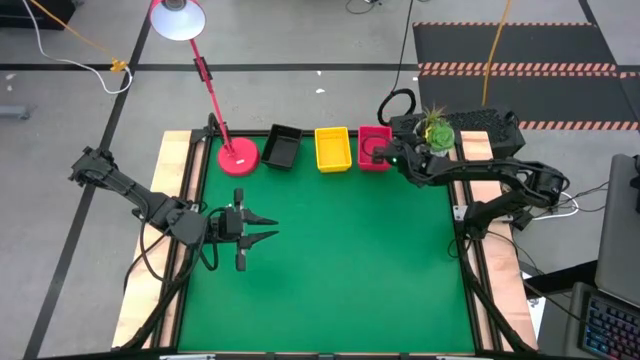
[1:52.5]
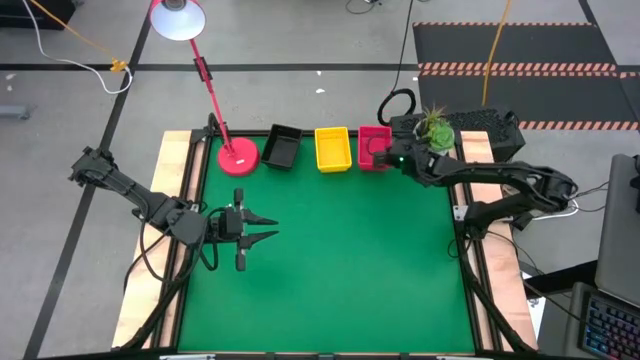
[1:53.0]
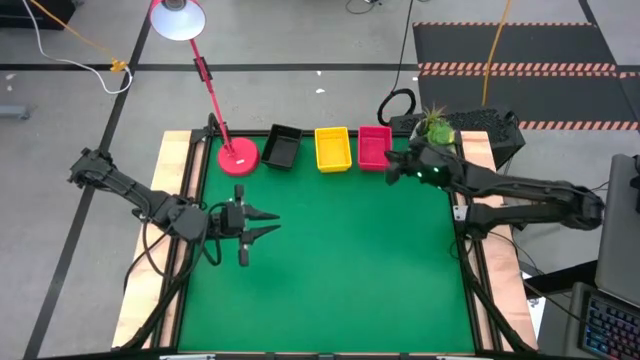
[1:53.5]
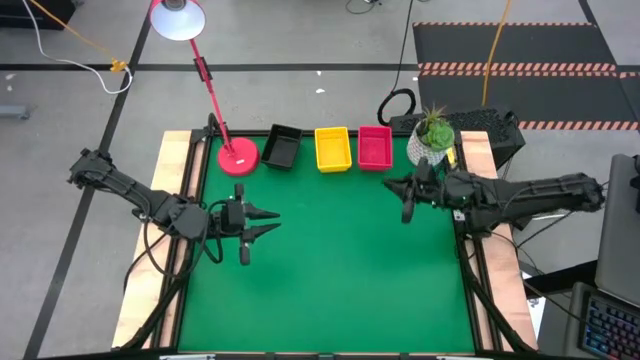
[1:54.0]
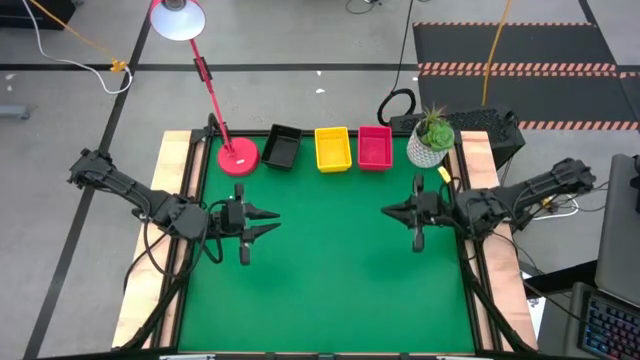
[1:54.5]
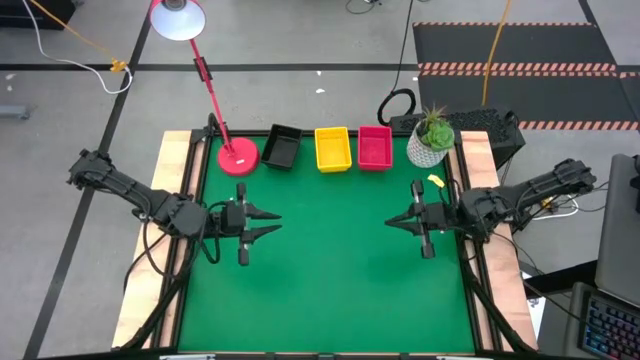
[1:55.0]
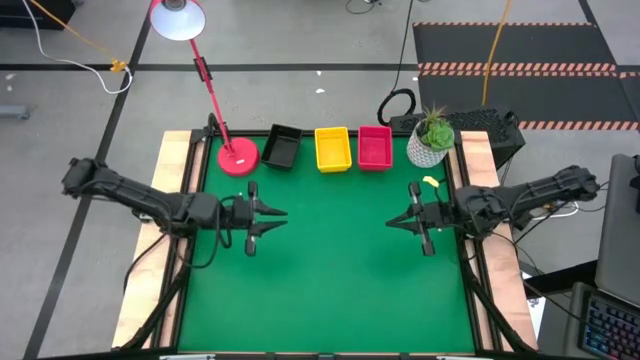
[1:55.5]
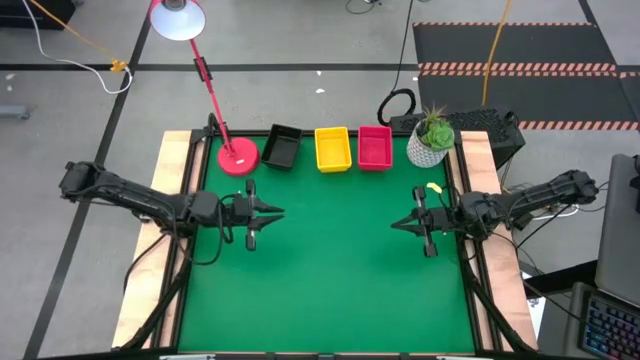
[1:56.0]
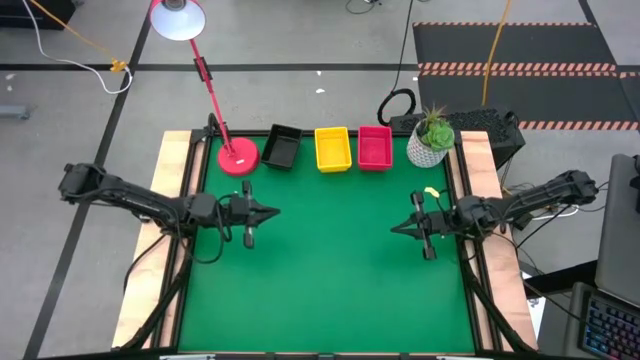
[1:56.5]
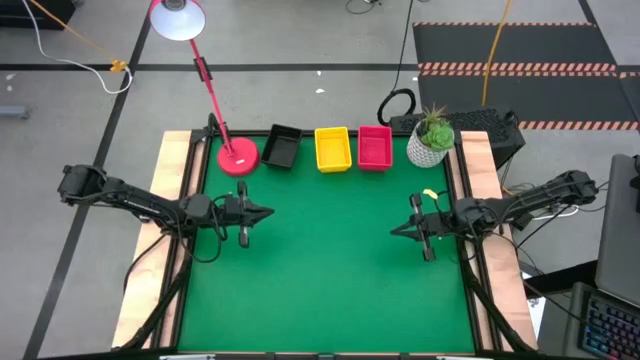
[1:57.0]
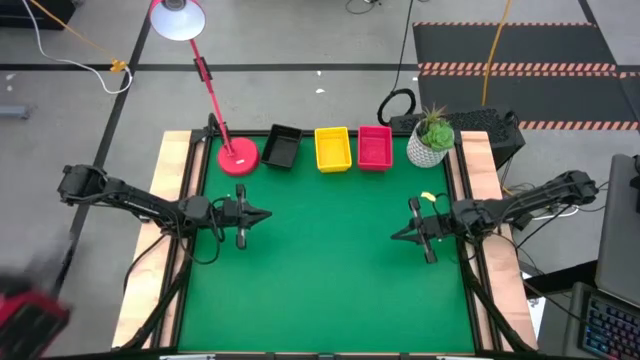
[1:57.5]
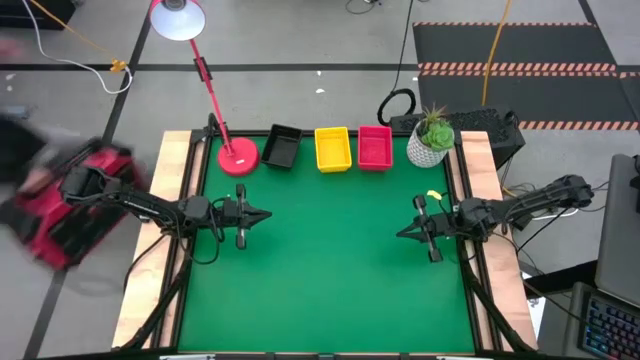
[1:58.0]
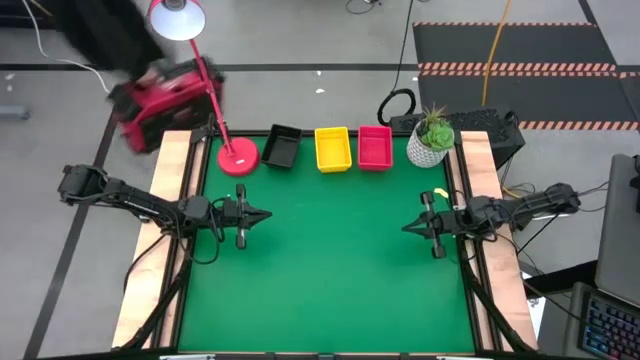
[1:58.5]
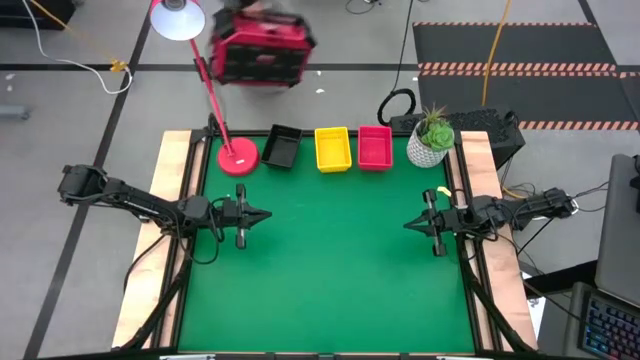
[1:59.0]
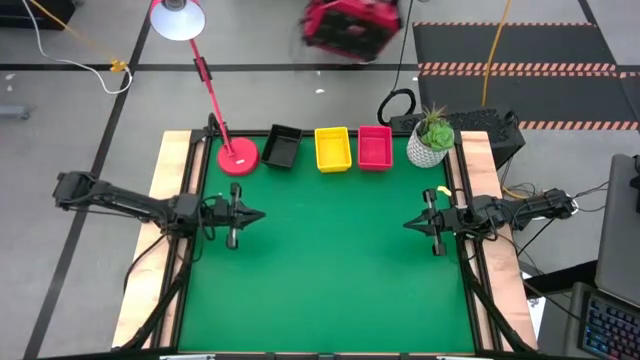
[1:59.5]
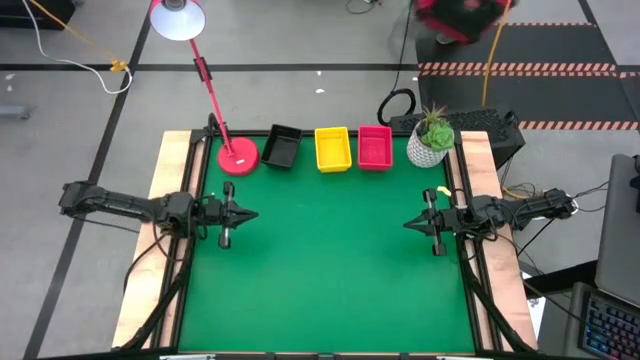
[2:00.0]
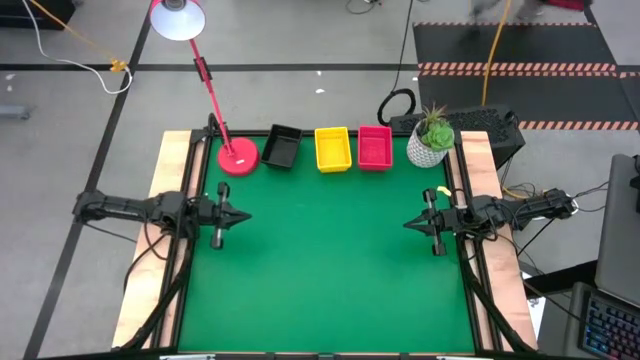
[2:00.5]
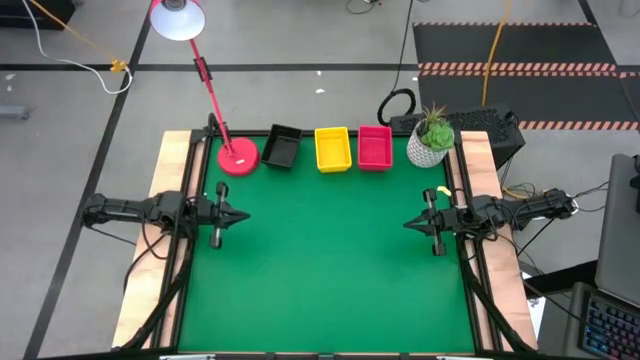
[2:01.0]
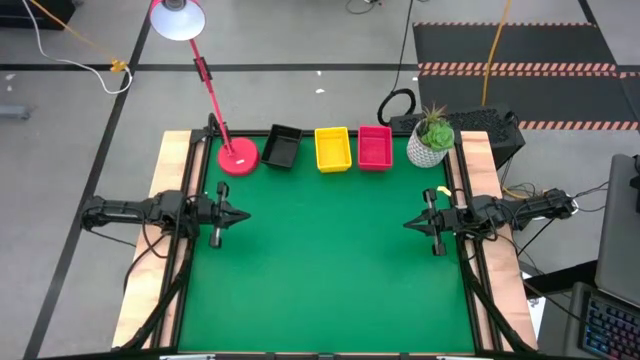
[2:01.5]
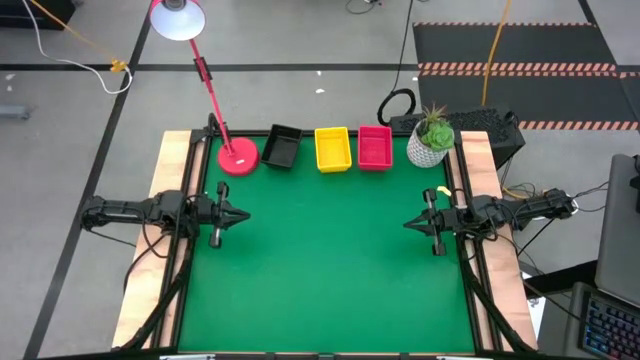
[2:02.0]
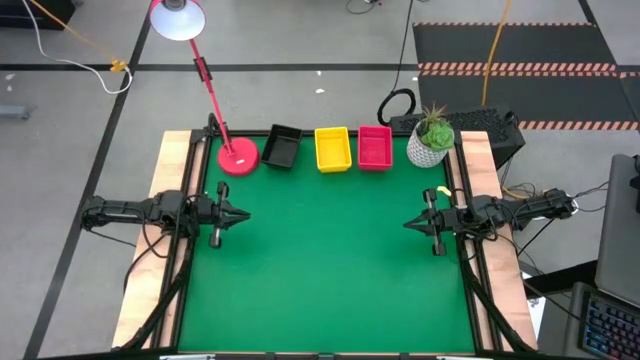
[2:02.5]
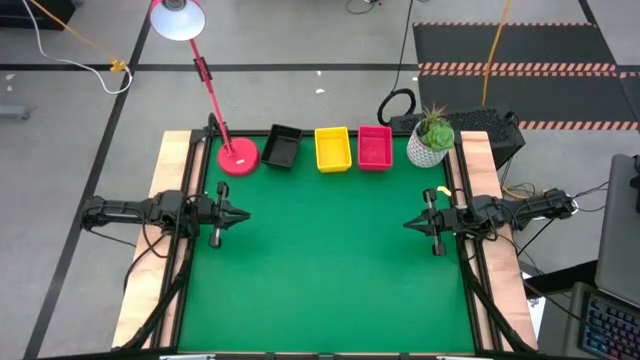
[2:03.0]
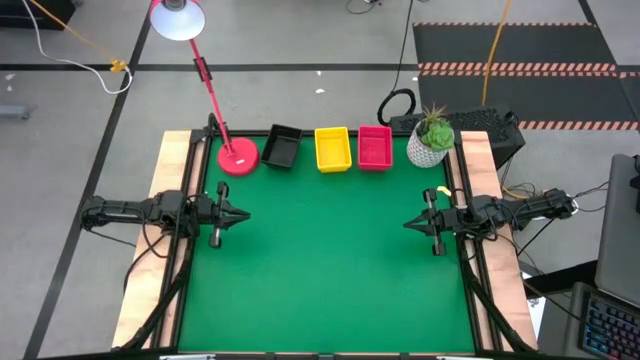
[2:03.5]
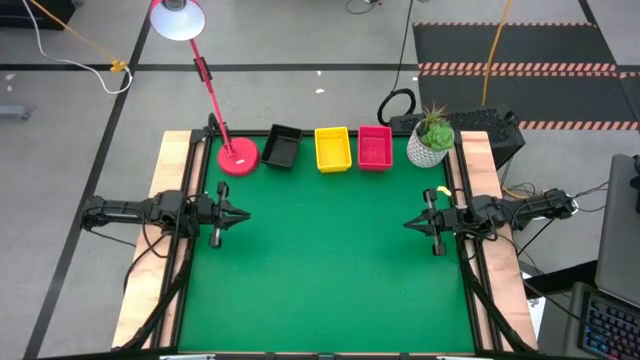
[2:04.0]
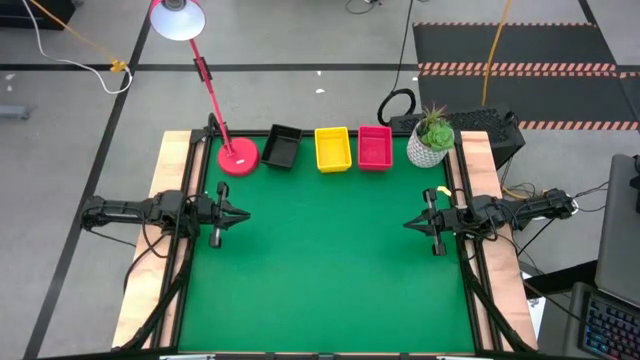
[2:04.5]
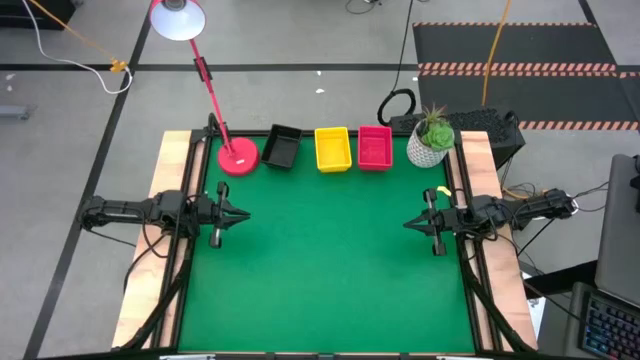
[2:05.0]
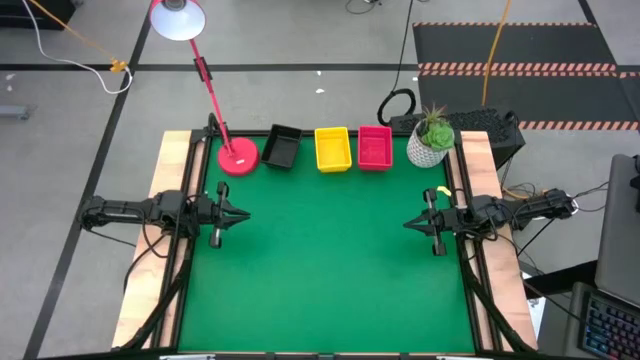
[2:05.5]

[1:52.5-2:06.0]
Return to Home Position

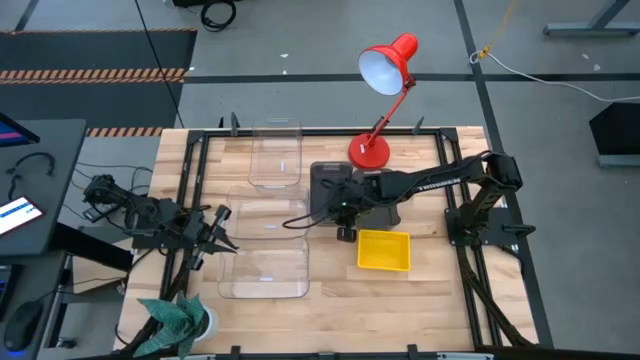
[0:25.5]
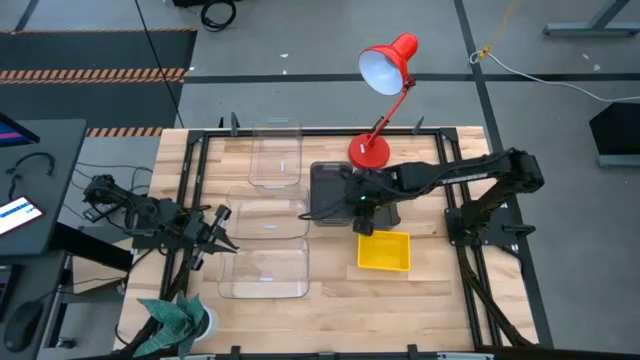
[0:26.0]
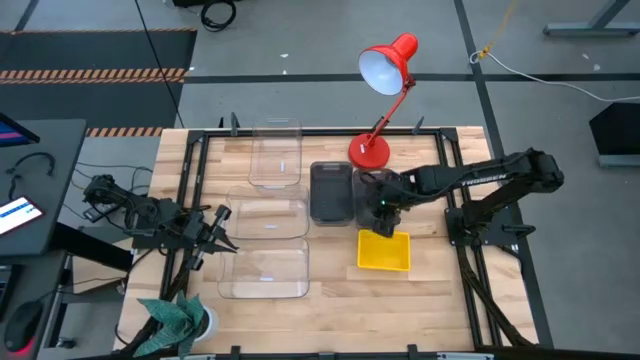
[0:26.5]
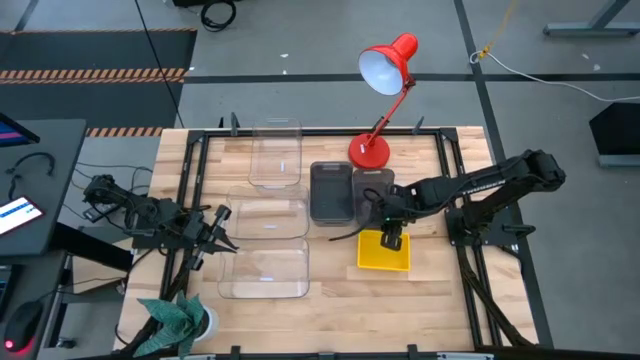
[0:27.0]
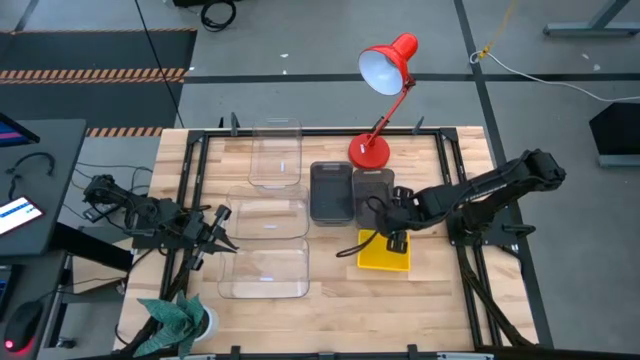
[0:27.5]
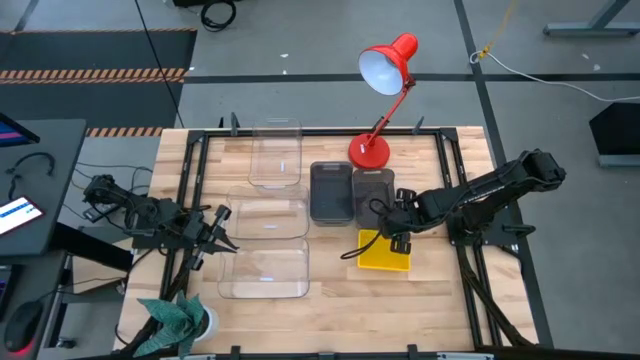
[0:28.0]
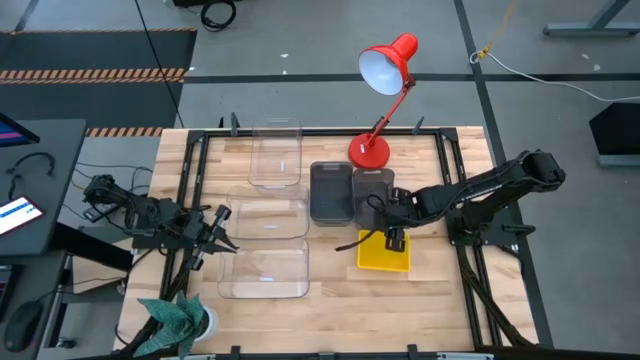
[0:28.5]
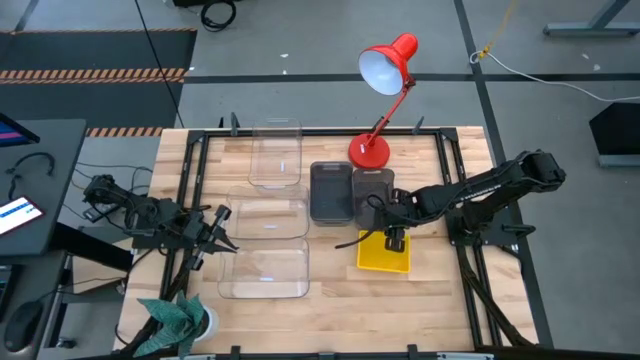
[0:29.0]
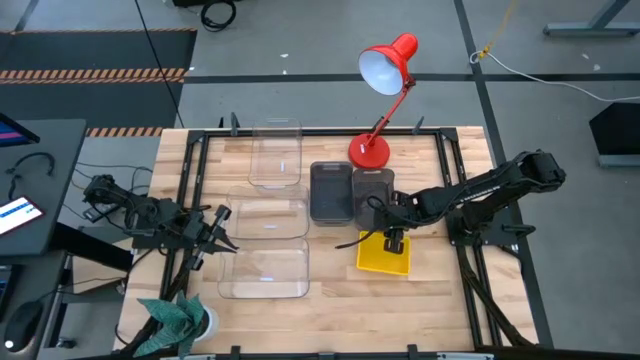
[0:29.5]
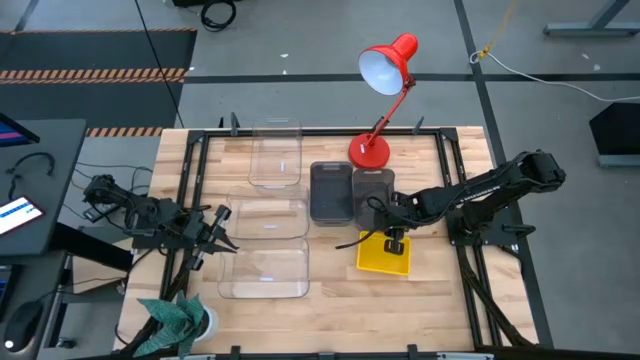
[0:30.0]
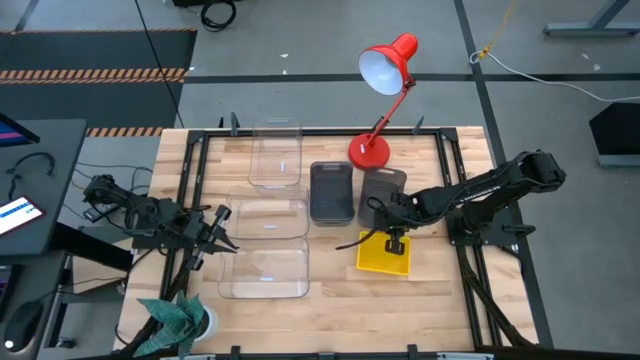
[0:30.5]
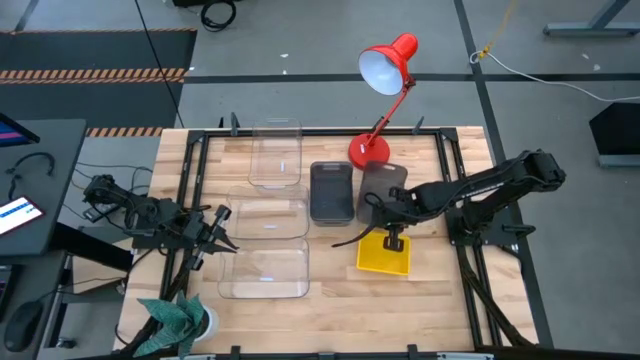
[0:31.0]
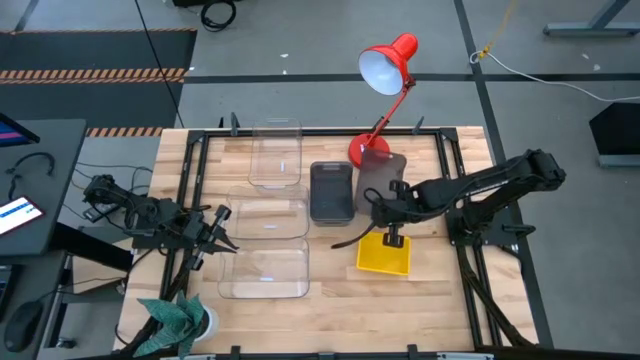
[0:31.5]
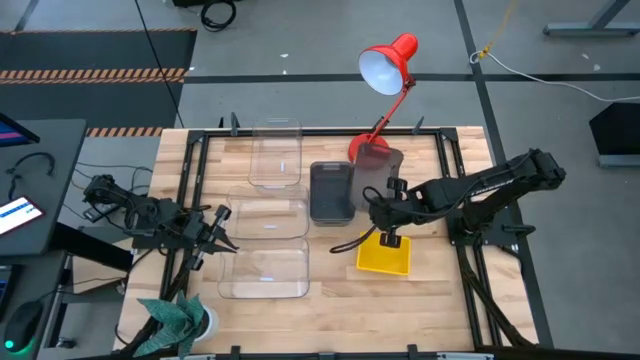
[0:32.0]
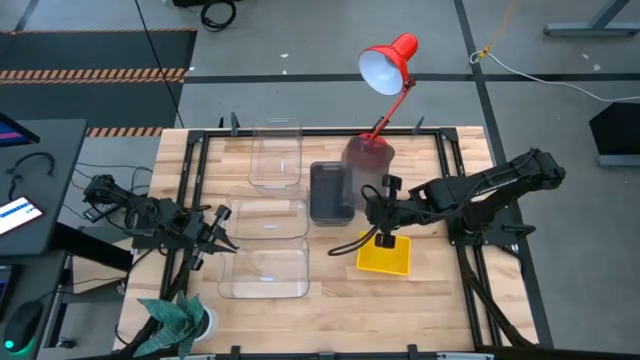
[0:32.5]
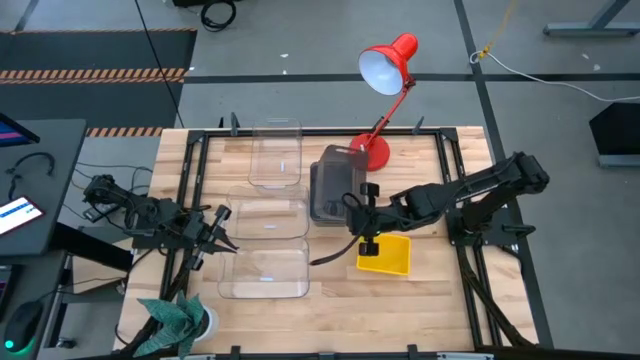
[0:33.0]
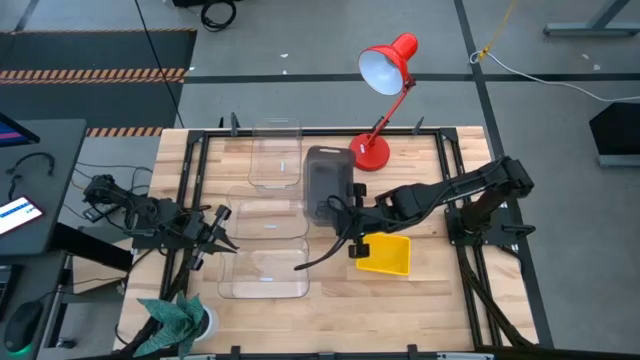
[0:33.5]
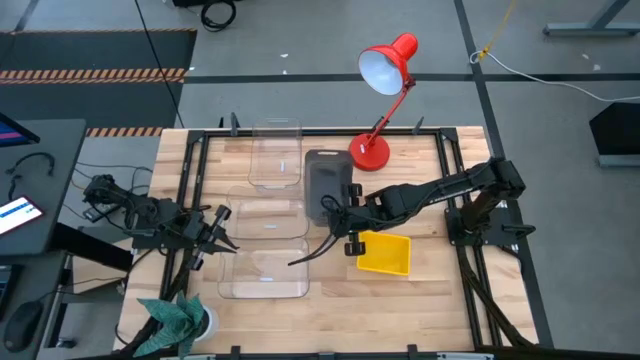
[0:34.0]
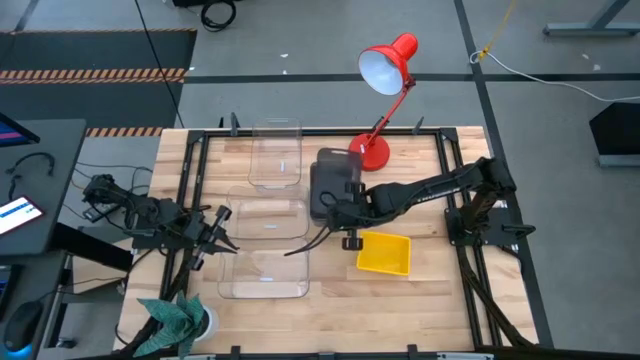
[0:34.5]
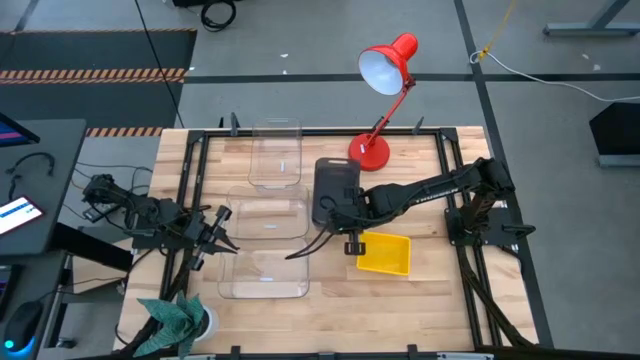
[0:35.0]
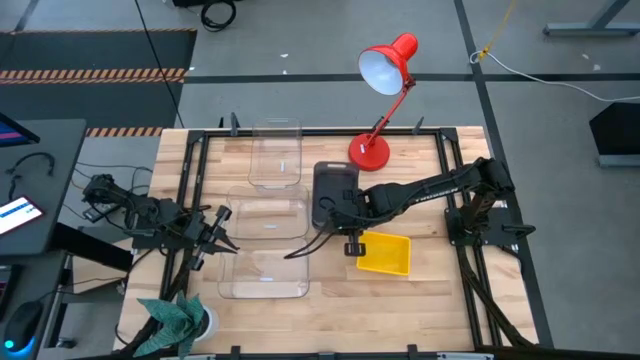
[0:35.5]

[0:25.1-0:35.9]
Stack the right black bin on the stacked black bins
